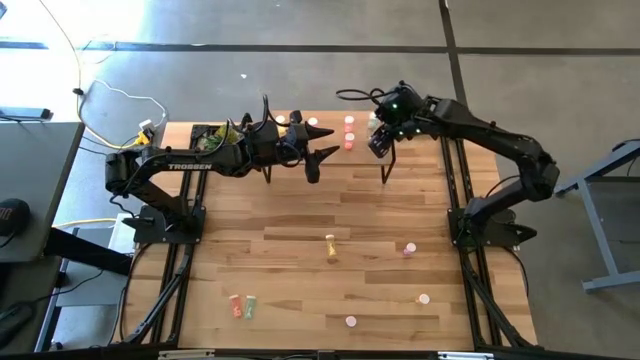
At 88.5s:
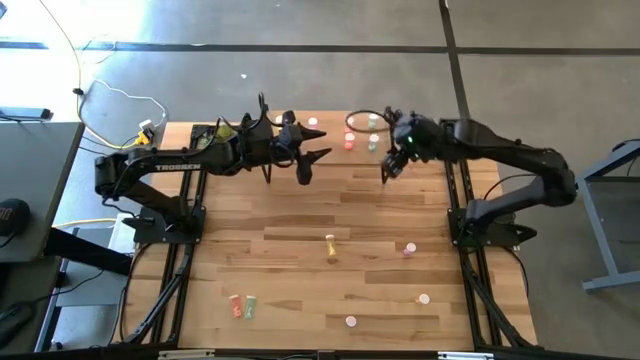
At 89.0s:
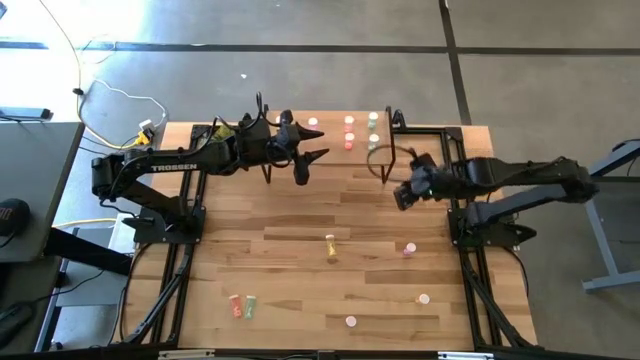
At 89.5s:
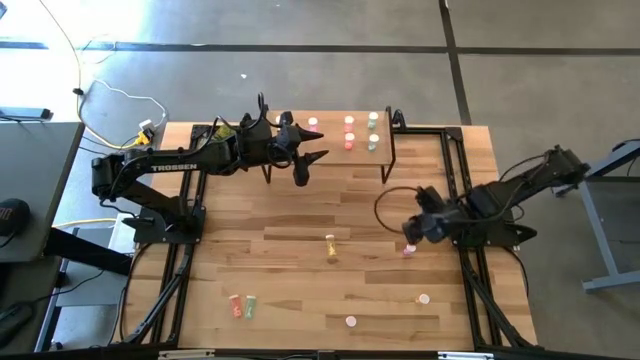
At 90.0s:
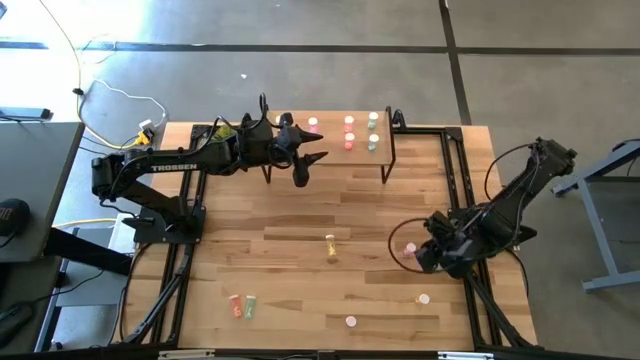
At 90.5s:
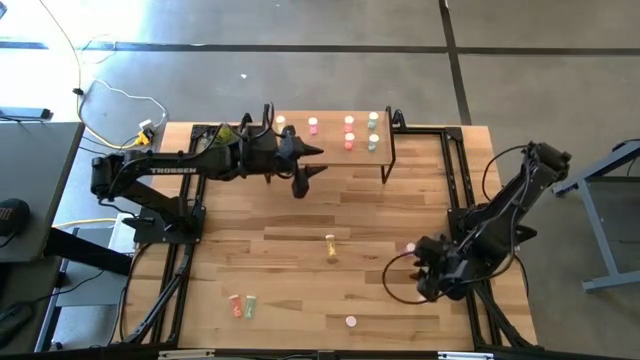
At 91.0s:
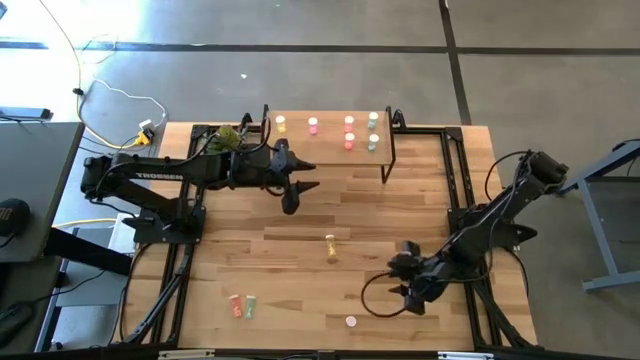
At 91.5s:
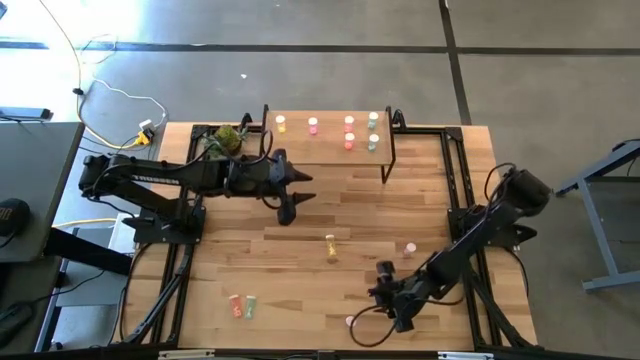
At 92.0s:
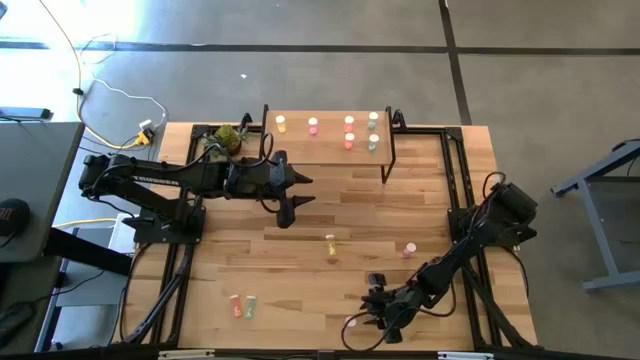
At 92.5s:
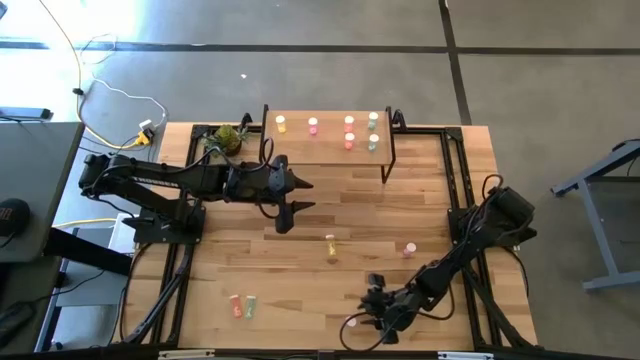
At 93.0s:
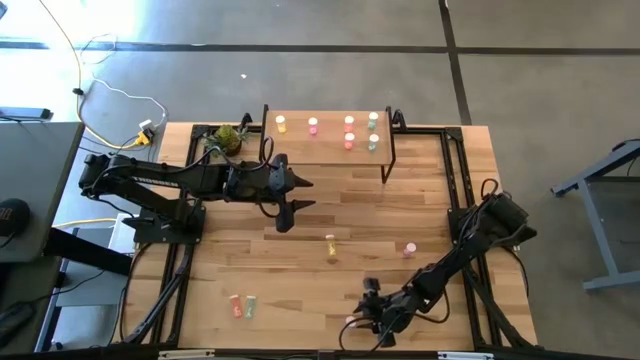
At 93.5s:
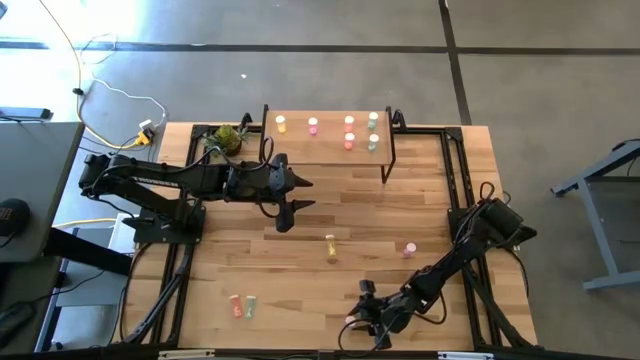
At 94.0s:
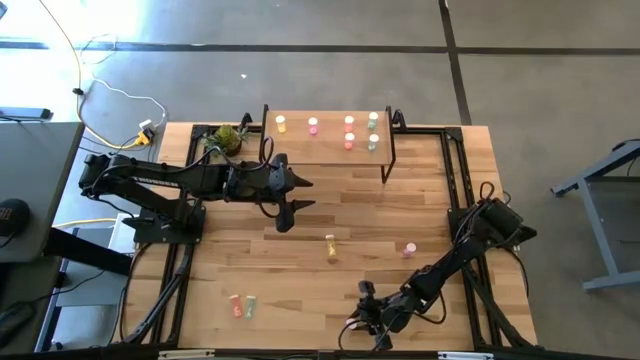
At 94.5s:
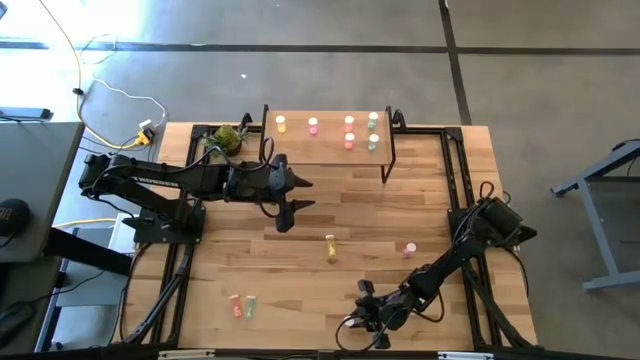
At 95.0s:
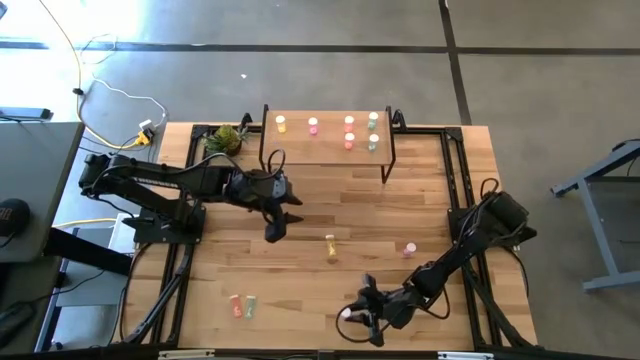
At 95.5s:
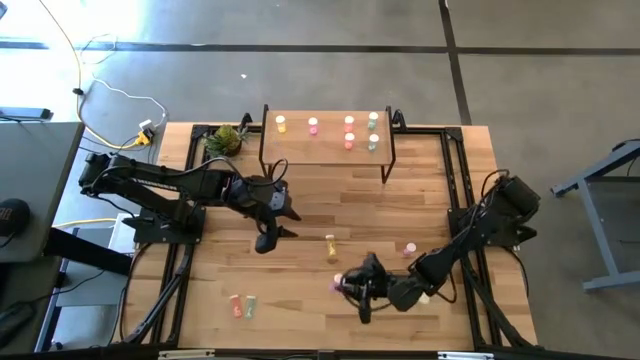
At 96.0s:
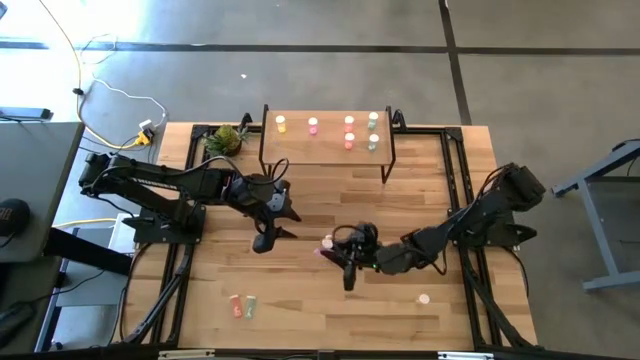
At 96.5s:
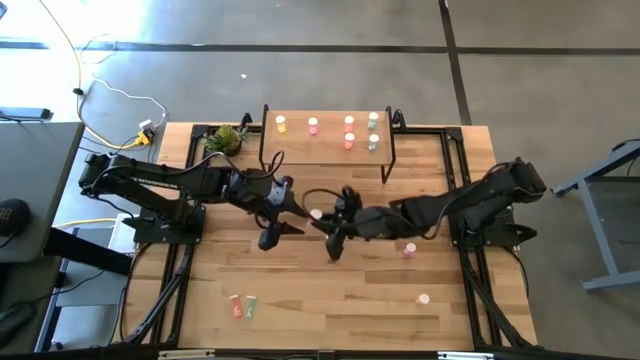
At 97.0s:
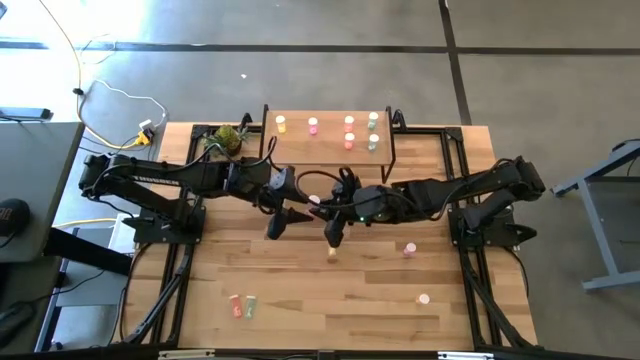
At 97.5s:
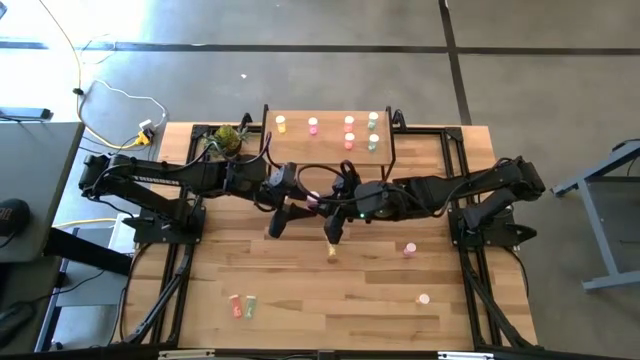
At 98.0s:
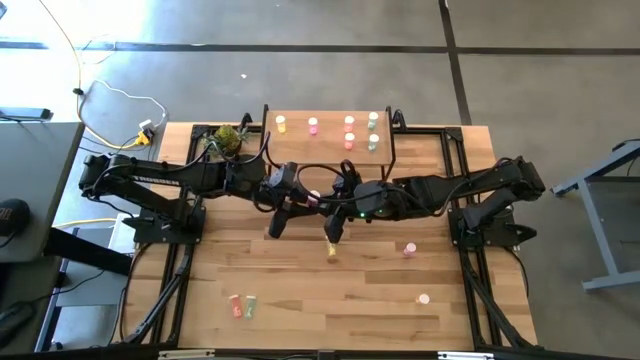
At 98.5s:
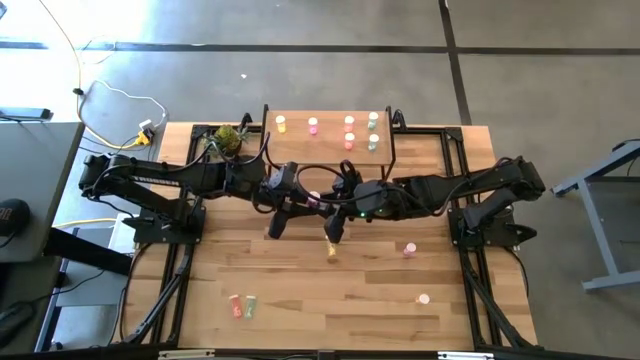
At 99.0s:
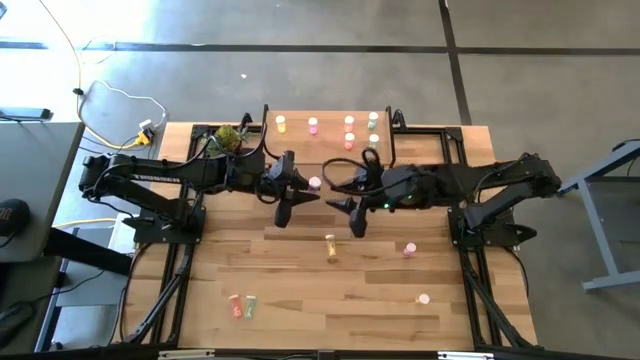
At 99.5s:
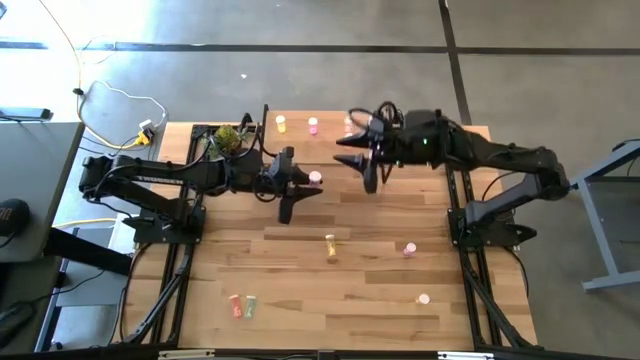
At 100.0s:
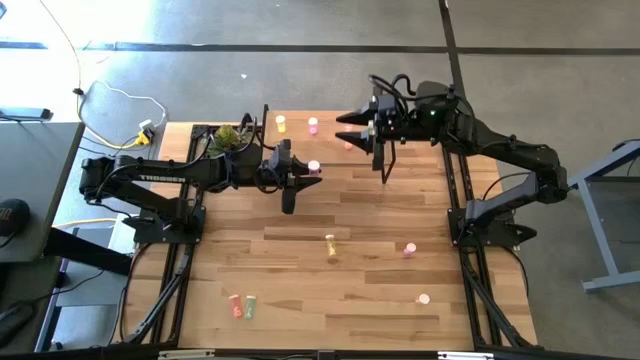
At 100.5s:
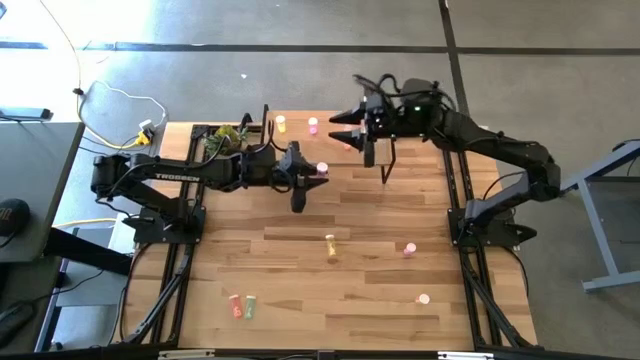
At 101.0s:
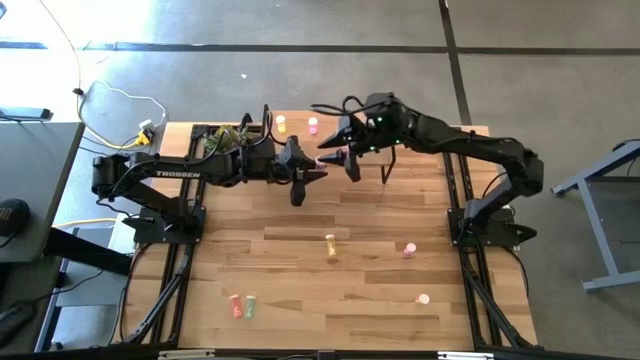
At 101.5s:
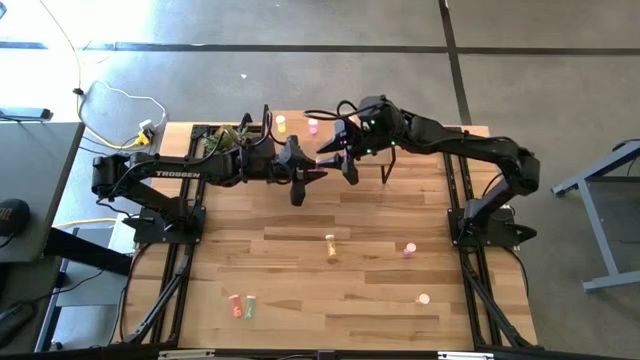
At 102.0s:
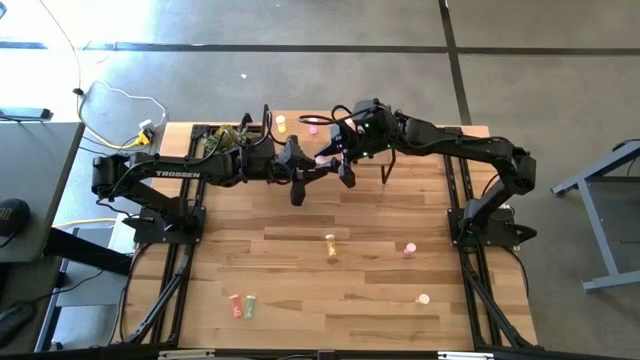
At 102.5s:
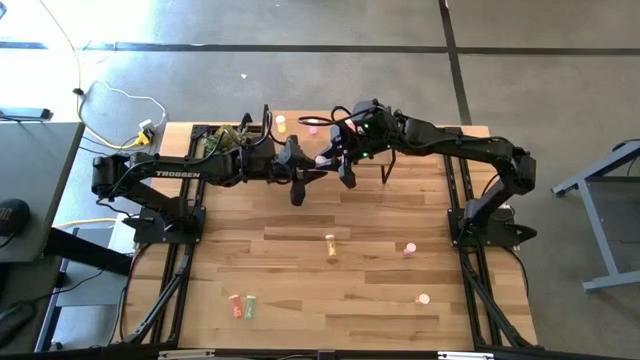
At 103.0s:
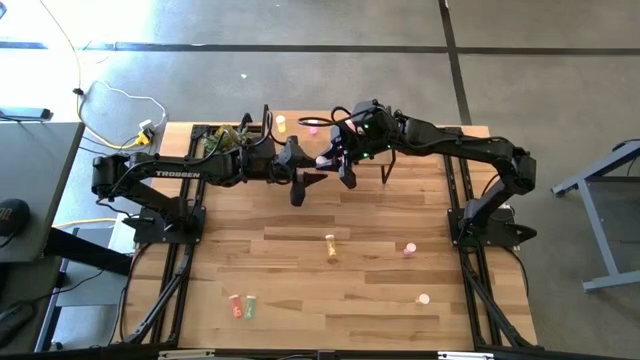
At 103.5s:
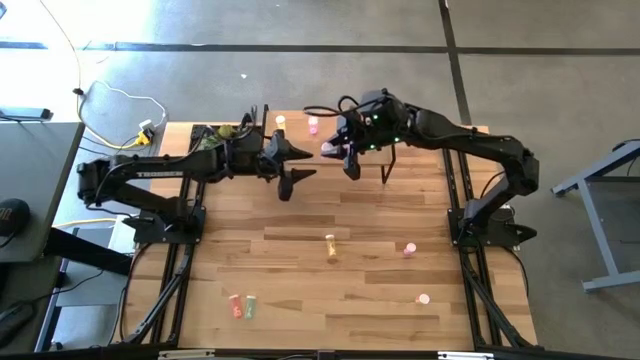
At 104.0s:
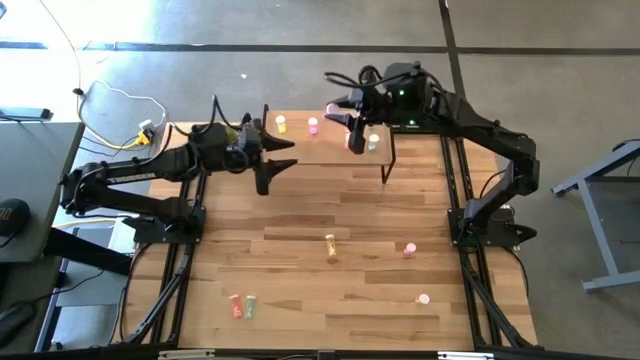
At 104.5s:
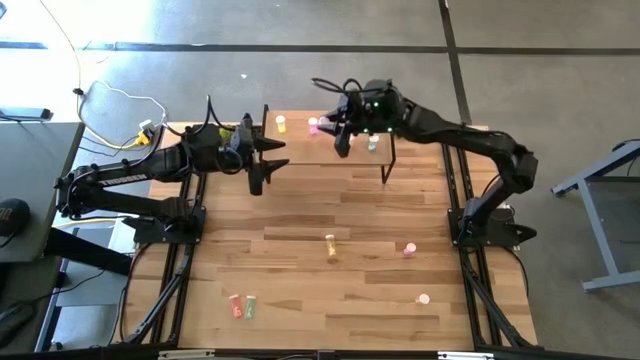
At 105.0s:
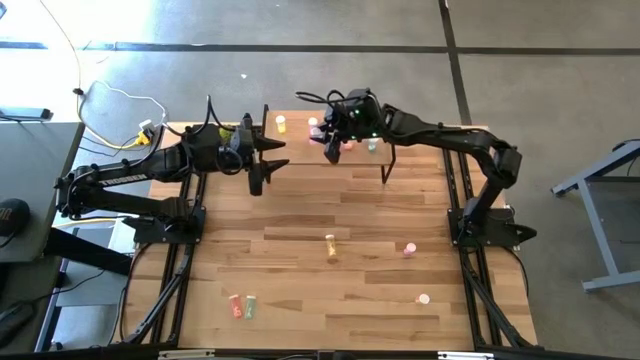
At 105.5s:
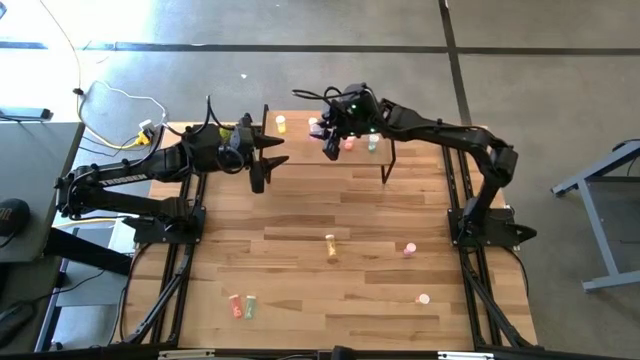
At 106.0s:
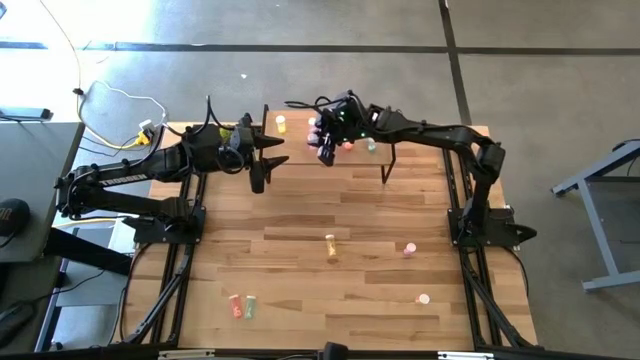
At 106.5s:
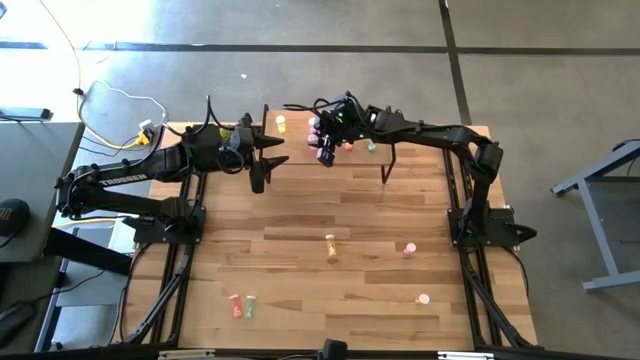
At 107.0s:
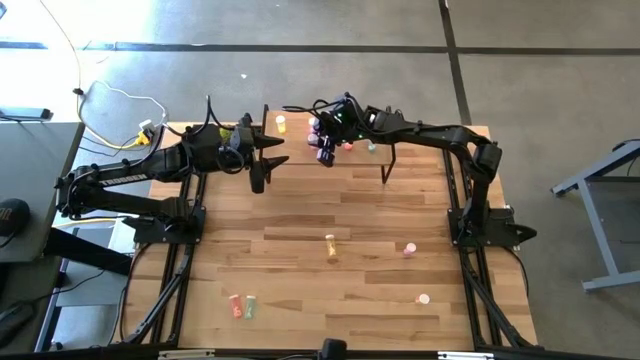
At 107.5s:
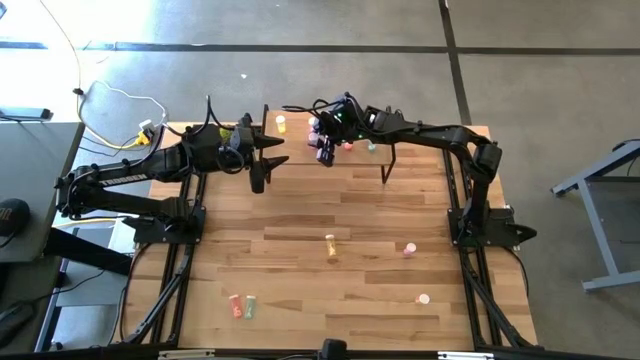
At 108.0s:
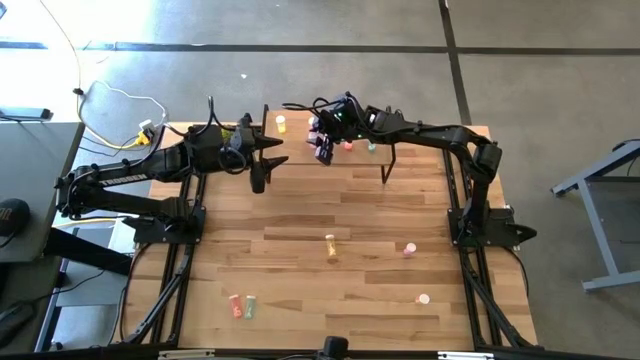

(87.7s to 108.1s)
Task: Pick and place medicine bottles onto shelf by color
Put the bottom pink bottle on the shelf

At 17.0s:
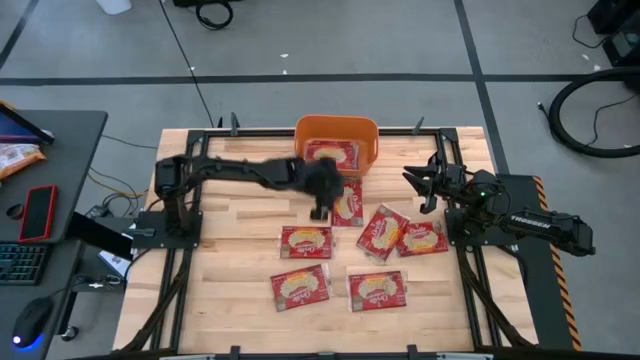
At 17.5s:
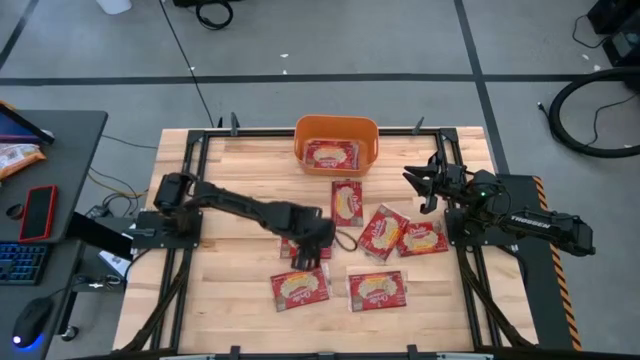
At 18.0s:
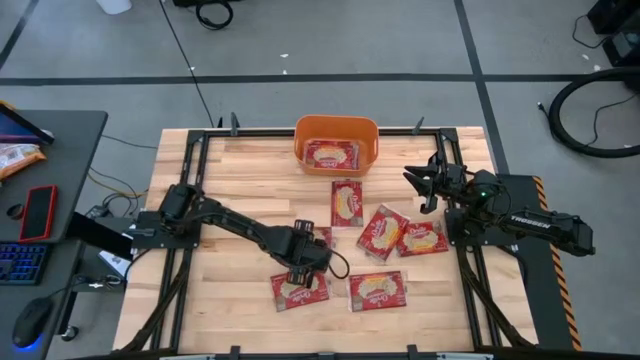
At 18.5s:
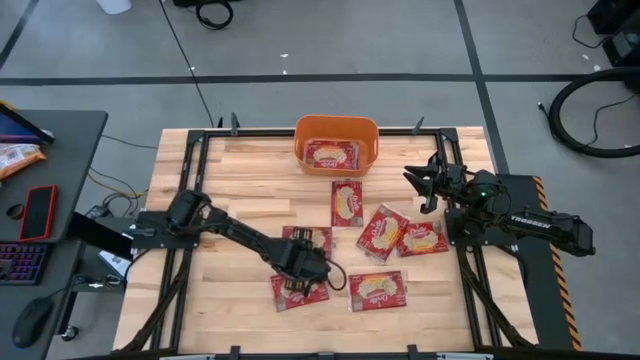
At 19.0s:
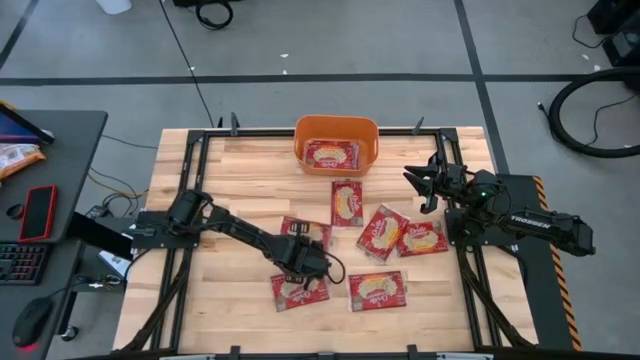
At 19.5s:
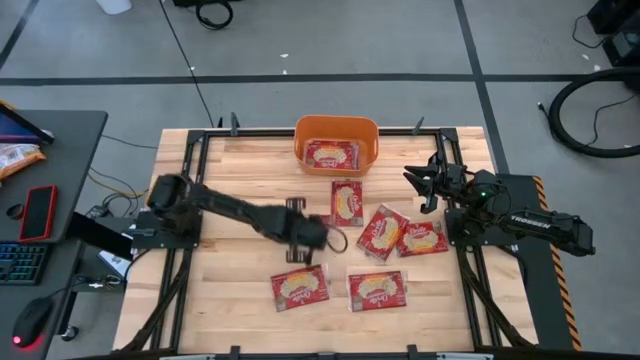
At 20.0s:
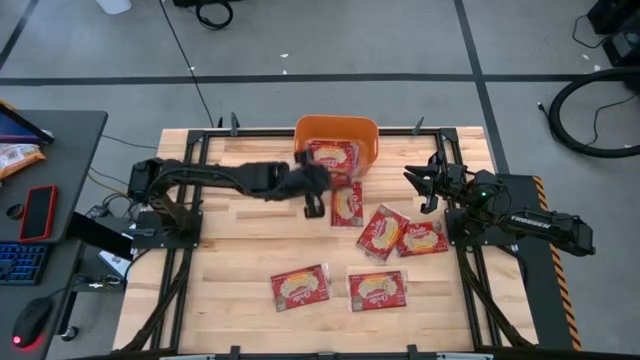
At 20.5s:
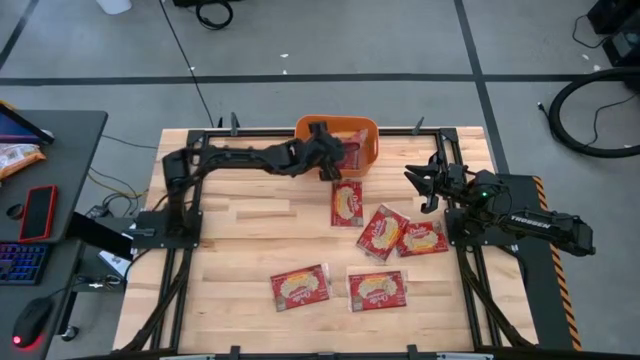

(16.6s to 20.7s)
Task: Sort popcorn bags into baskets
Put the red popcorn bag into the orange bin
